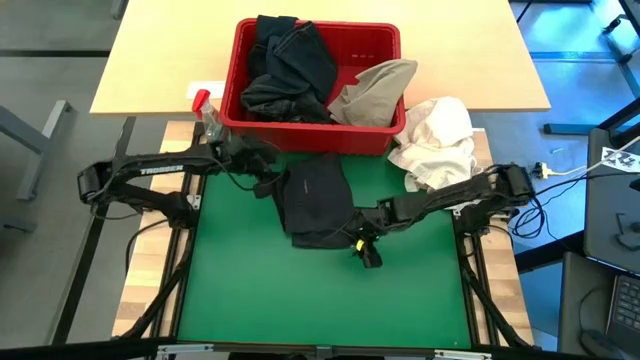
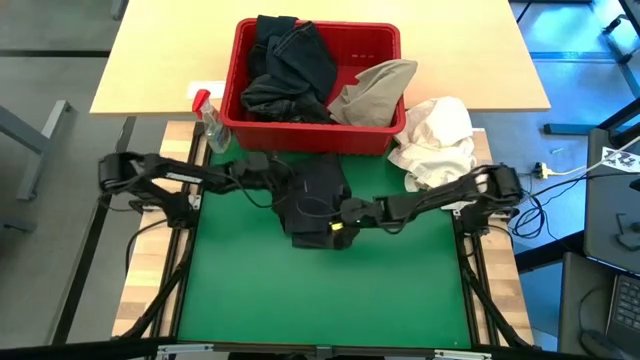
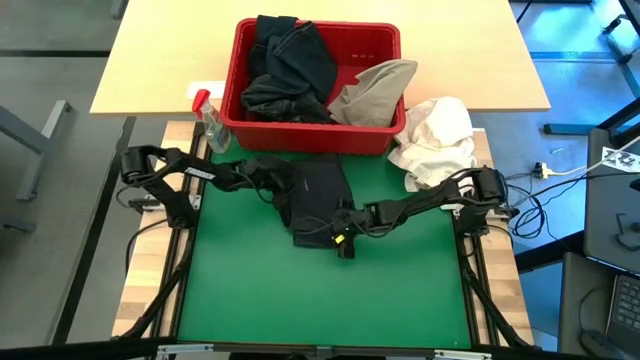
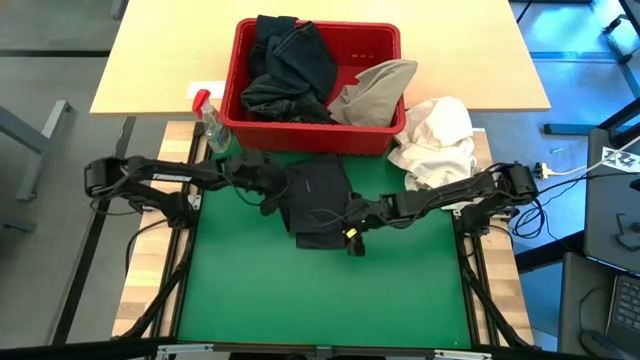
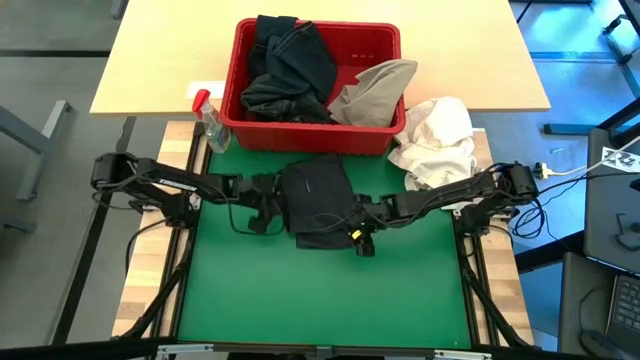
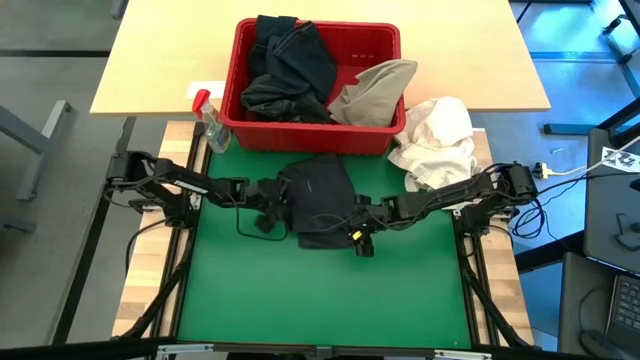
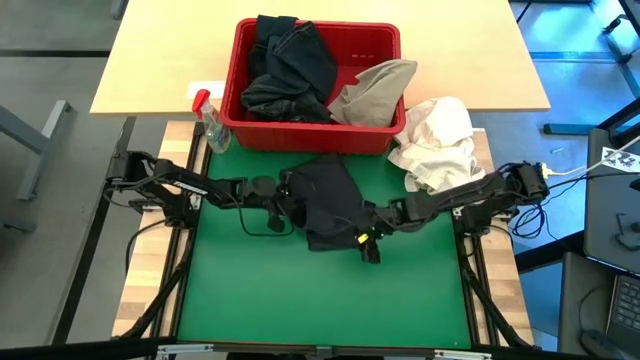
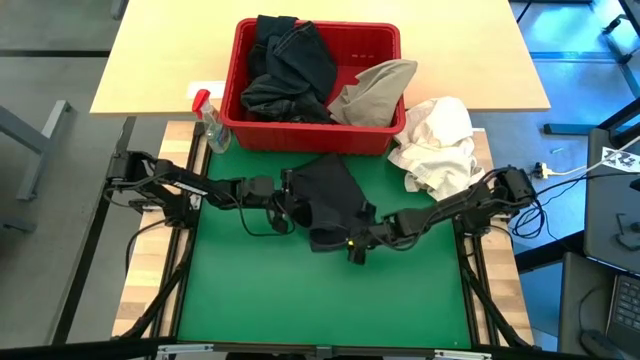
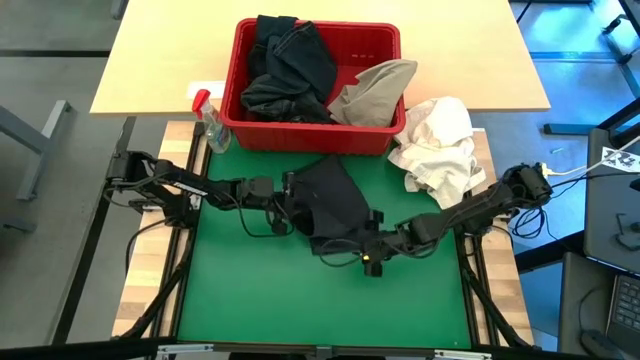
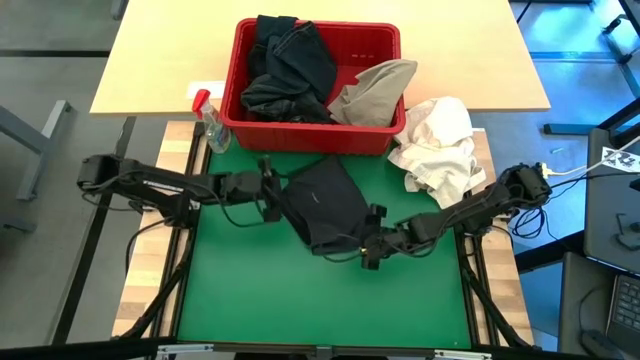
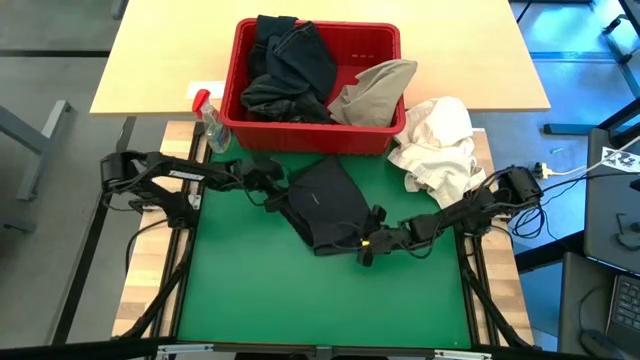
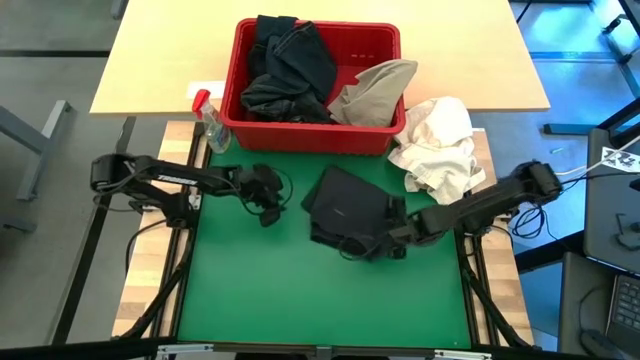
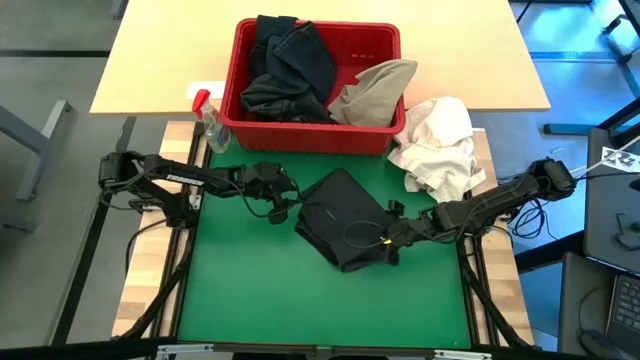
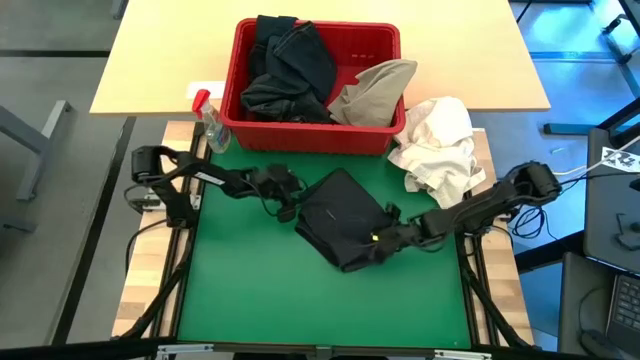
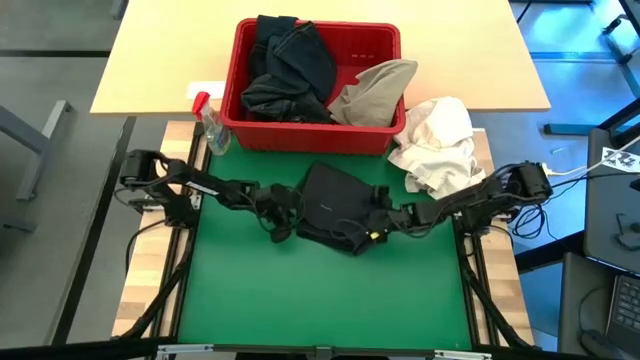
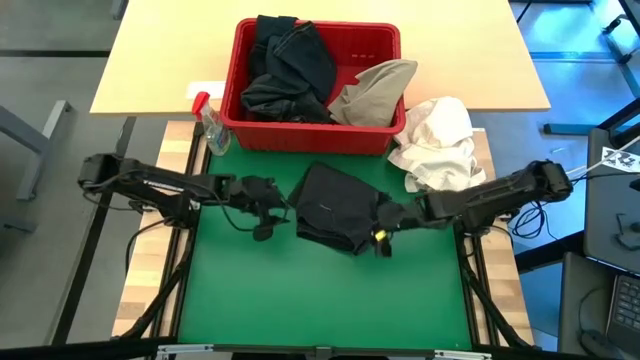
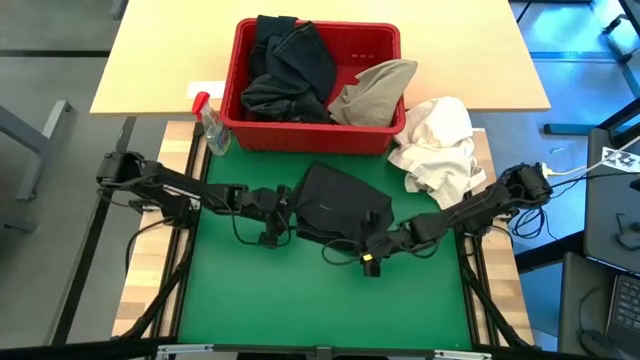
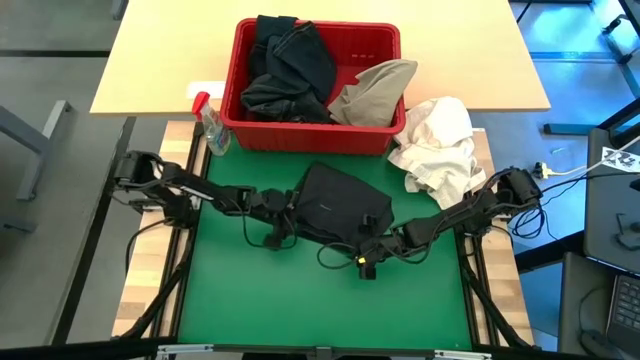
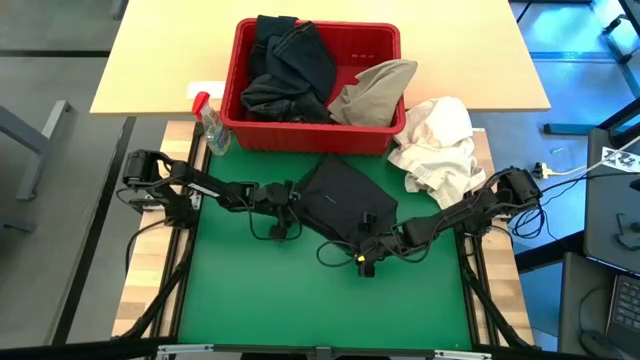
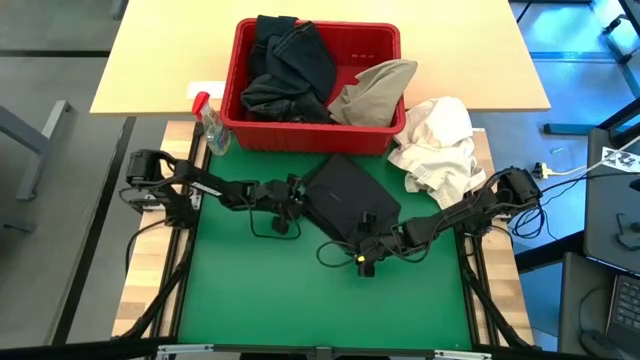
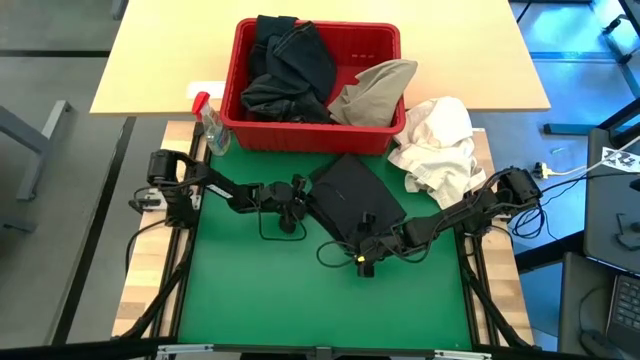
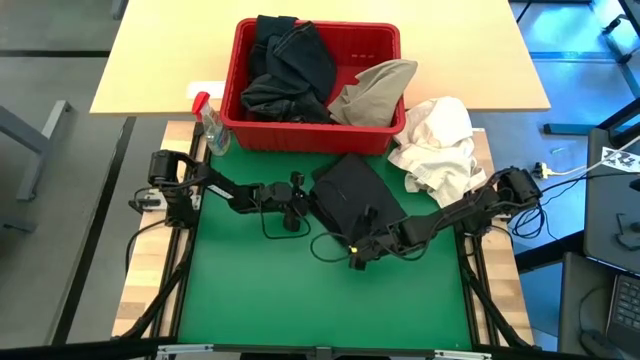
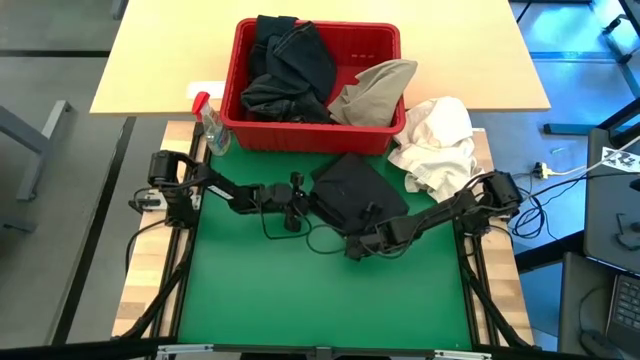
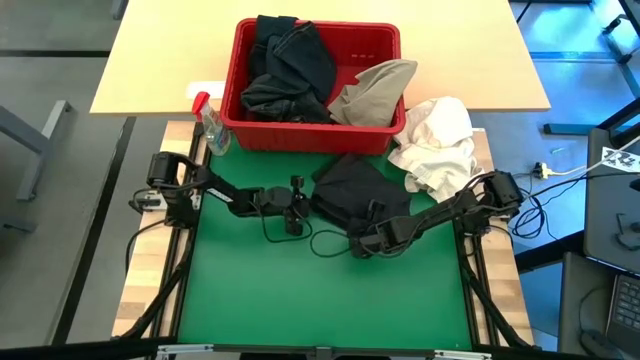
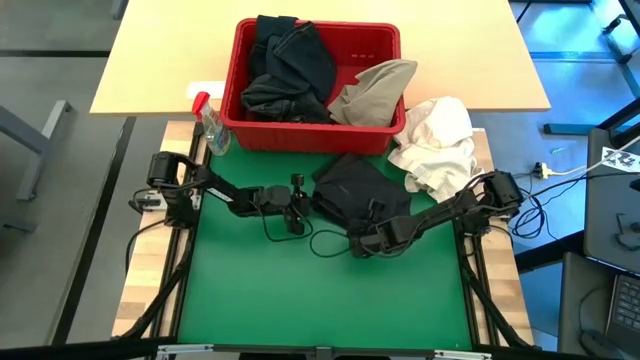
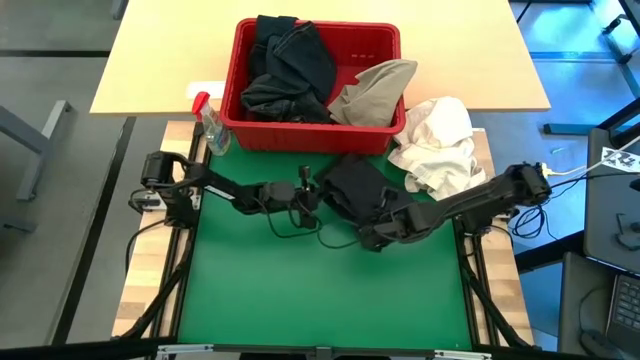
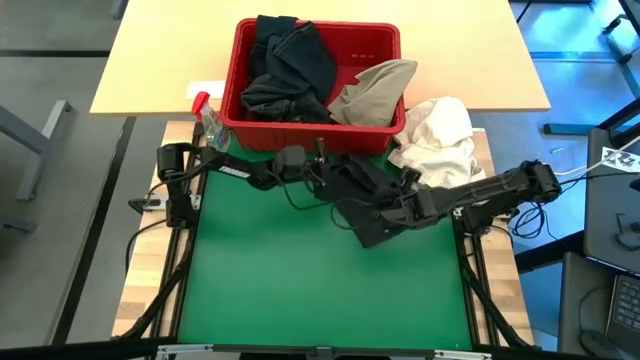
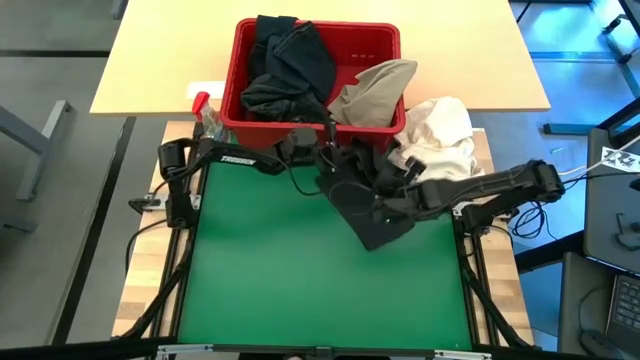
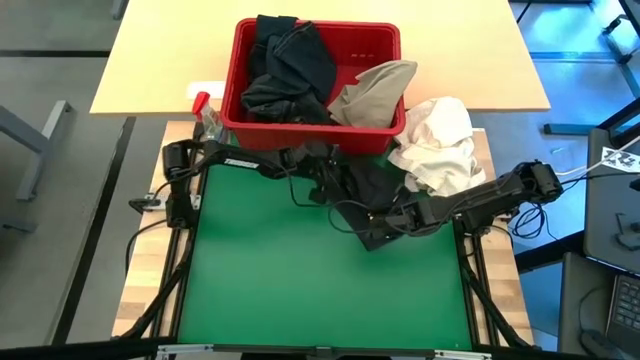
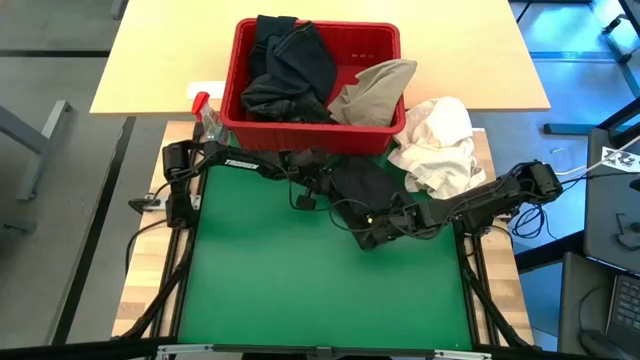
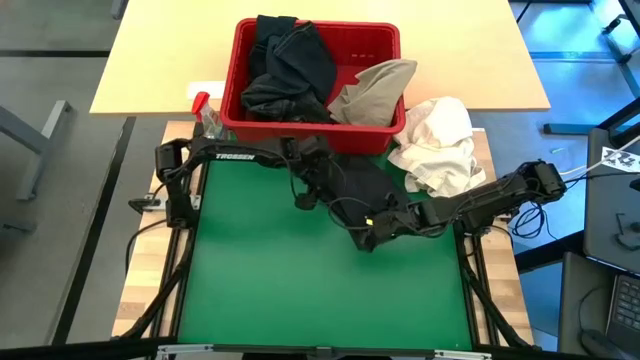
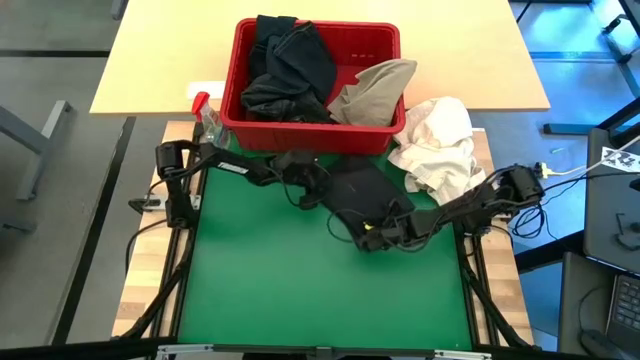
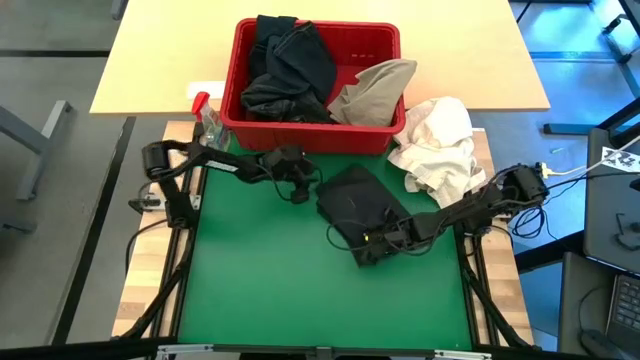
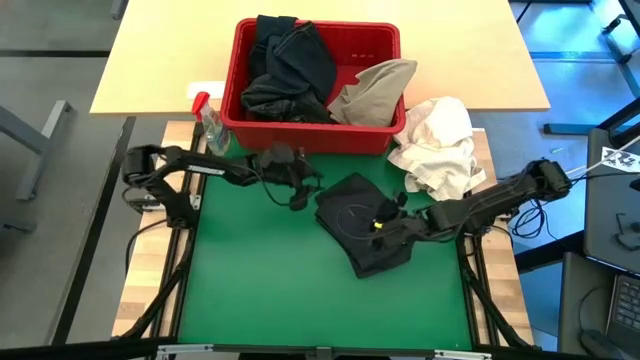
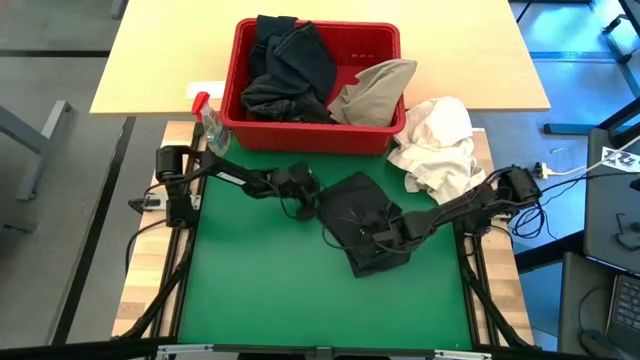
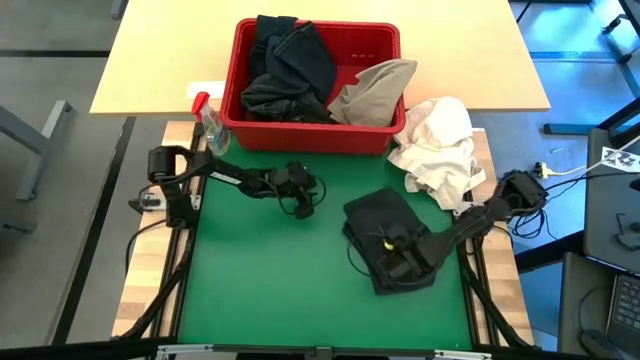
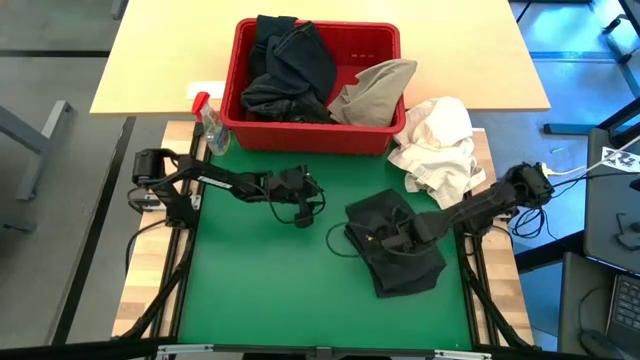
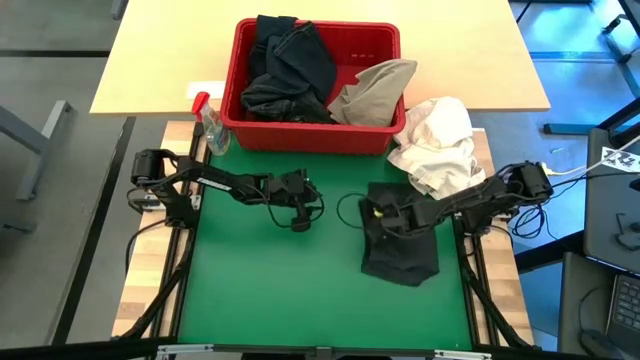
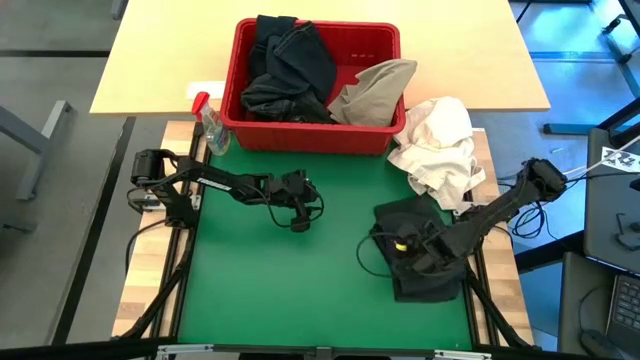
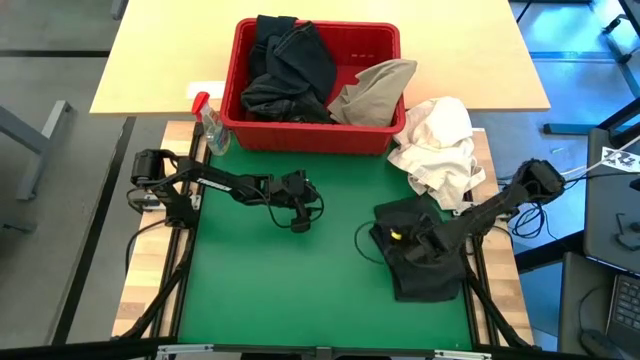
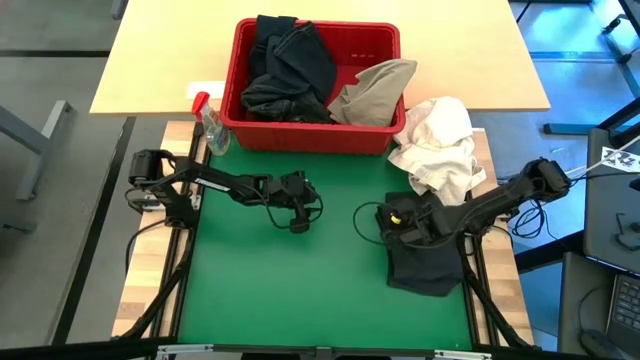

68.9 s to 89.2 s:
Task: Fold Laundry from Bin
Fold the black shorts
